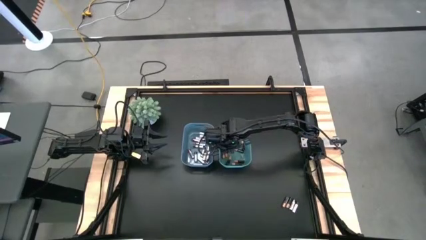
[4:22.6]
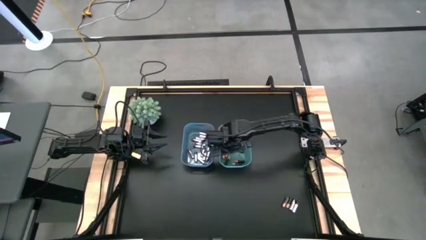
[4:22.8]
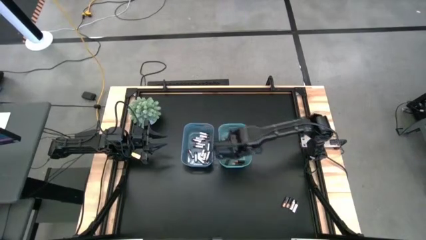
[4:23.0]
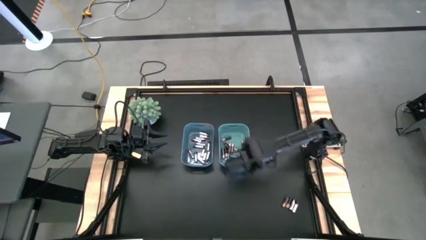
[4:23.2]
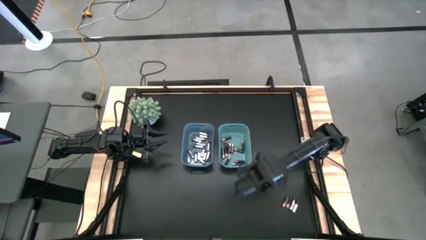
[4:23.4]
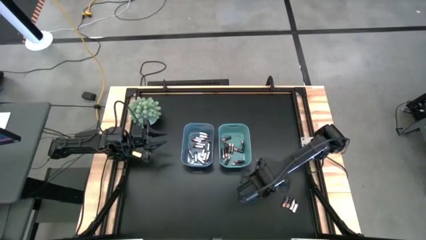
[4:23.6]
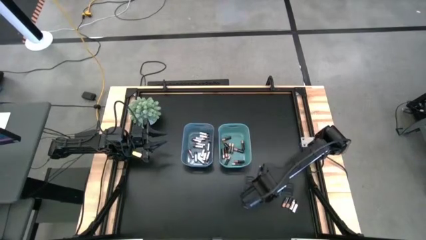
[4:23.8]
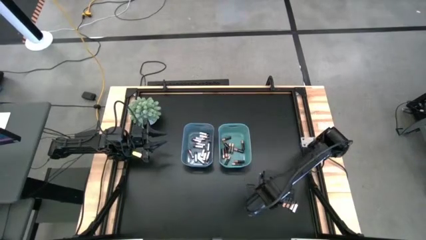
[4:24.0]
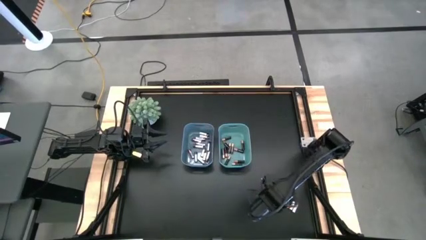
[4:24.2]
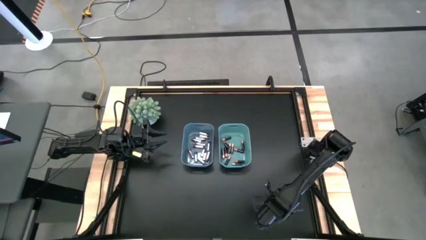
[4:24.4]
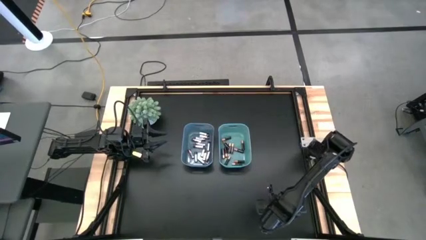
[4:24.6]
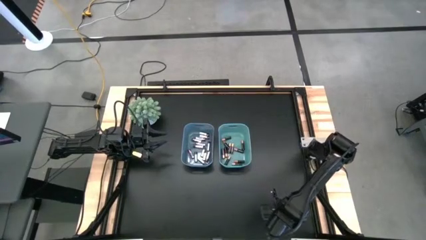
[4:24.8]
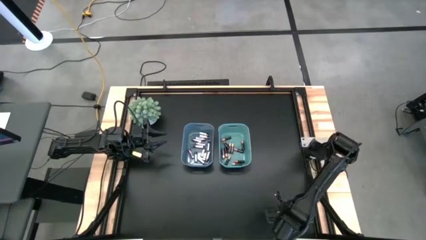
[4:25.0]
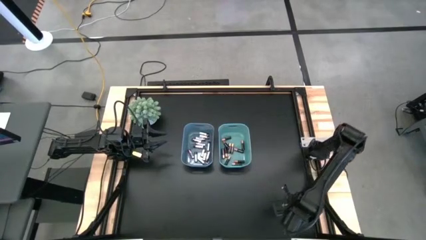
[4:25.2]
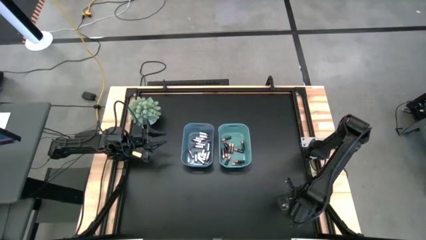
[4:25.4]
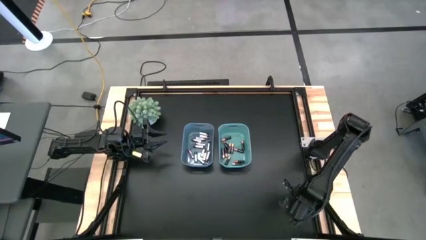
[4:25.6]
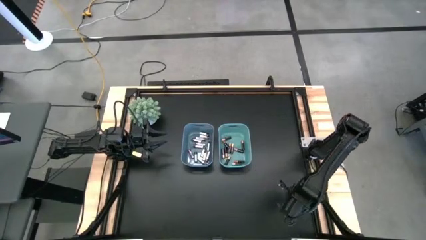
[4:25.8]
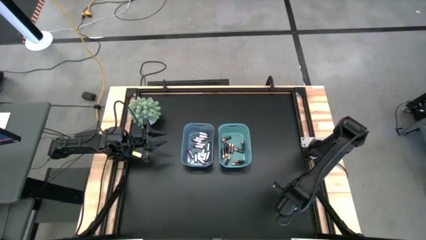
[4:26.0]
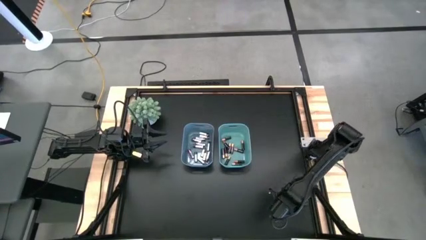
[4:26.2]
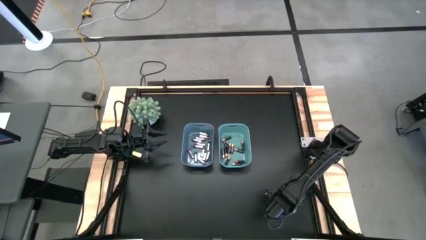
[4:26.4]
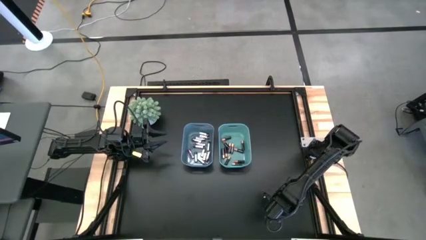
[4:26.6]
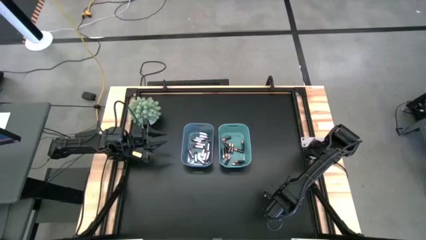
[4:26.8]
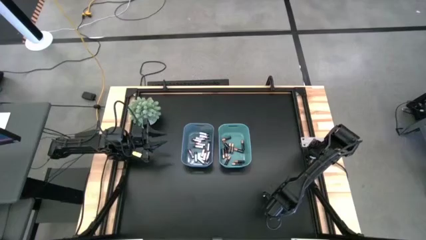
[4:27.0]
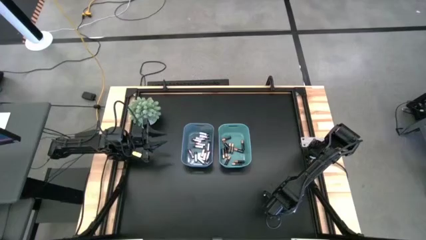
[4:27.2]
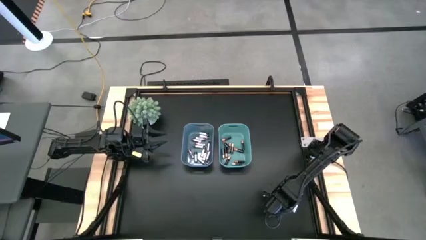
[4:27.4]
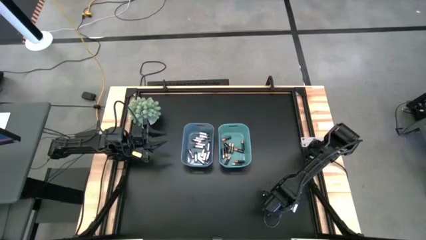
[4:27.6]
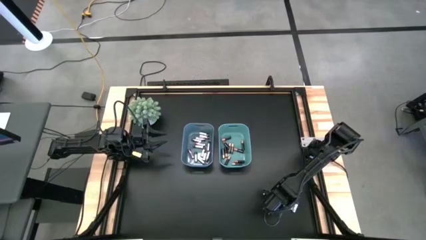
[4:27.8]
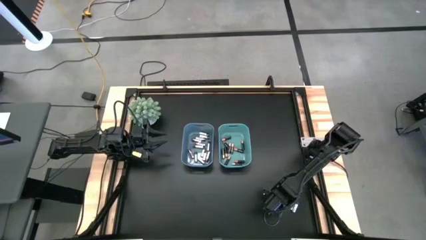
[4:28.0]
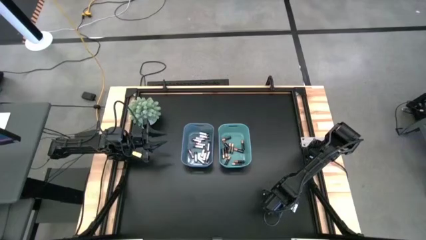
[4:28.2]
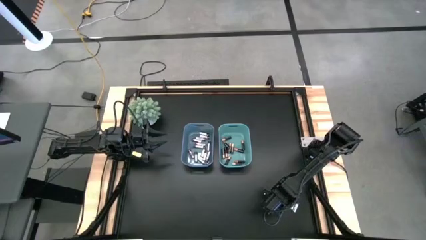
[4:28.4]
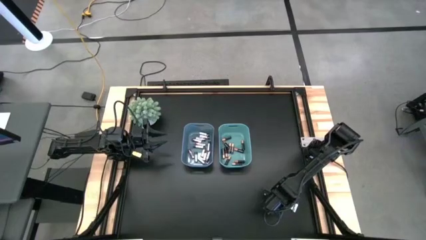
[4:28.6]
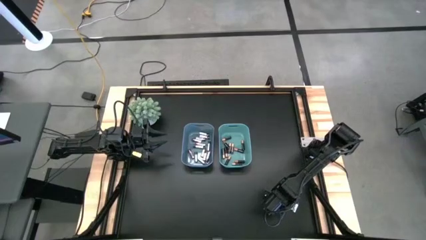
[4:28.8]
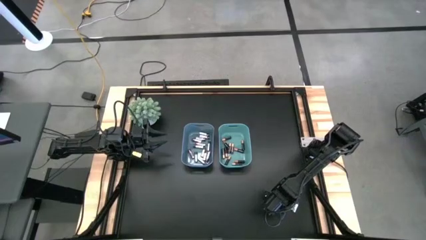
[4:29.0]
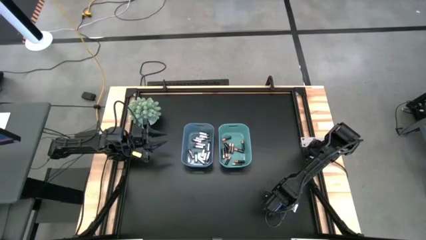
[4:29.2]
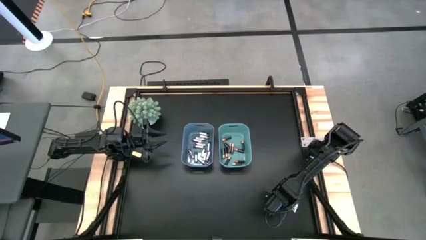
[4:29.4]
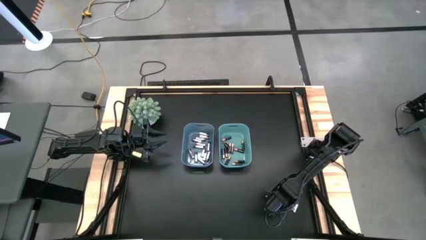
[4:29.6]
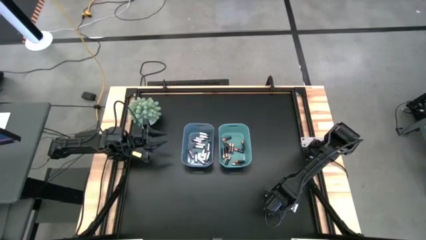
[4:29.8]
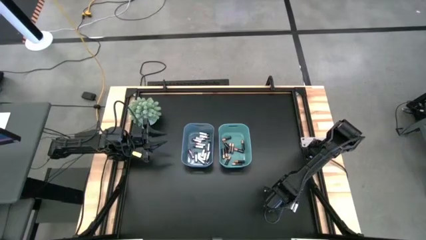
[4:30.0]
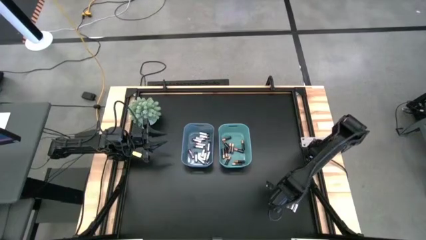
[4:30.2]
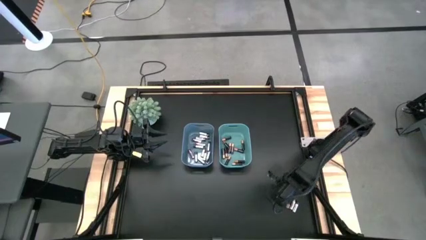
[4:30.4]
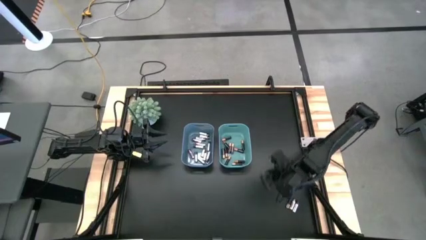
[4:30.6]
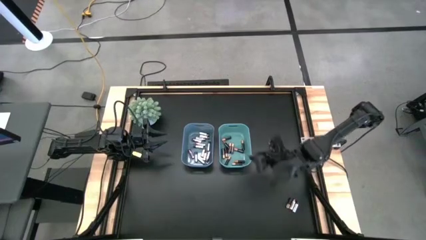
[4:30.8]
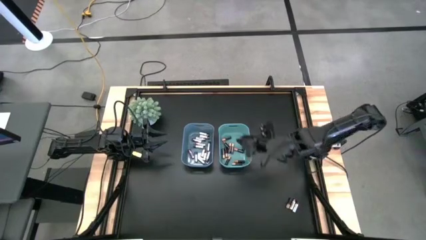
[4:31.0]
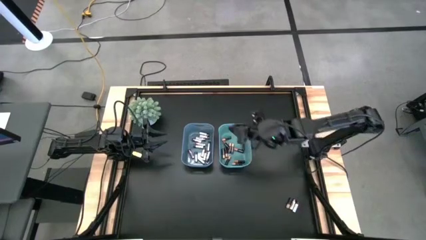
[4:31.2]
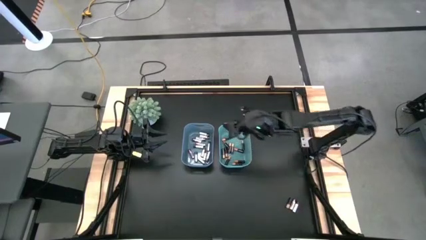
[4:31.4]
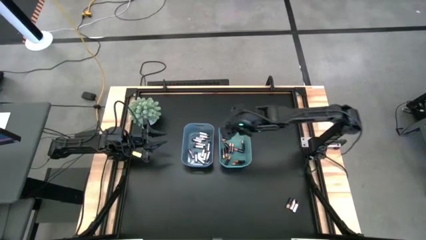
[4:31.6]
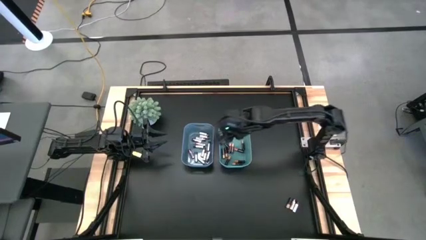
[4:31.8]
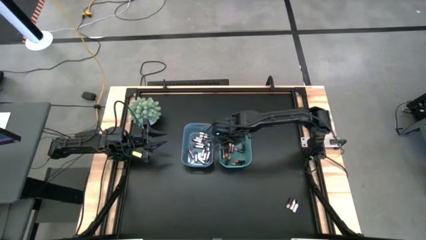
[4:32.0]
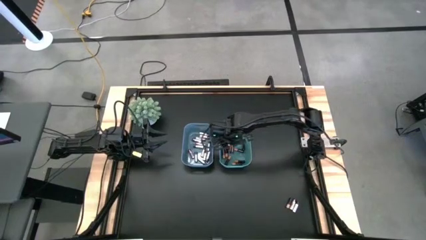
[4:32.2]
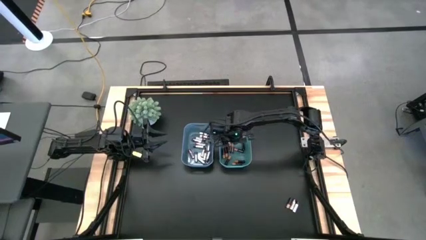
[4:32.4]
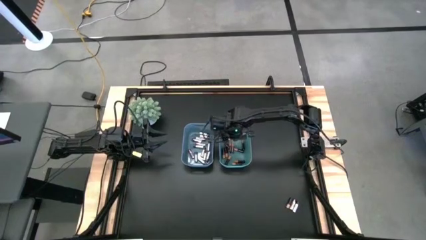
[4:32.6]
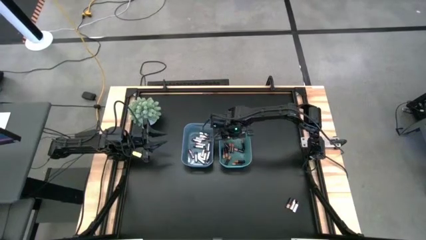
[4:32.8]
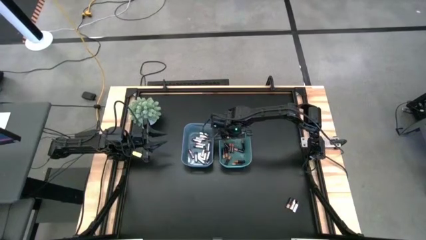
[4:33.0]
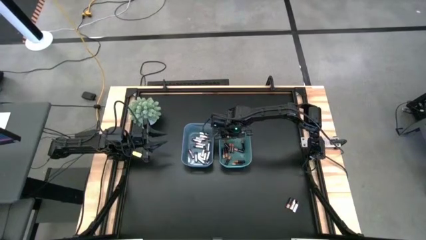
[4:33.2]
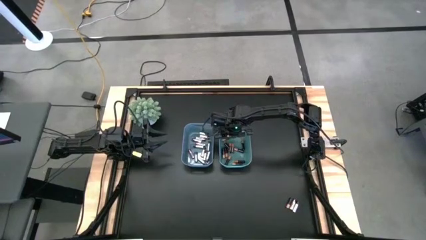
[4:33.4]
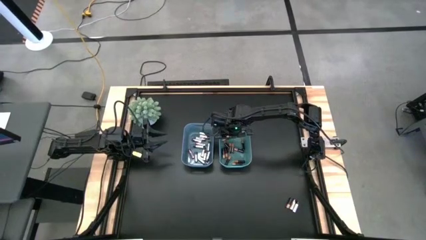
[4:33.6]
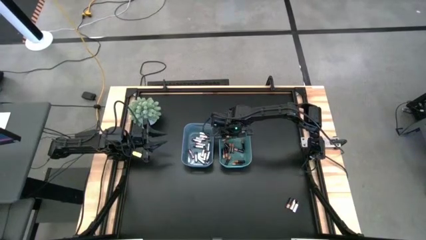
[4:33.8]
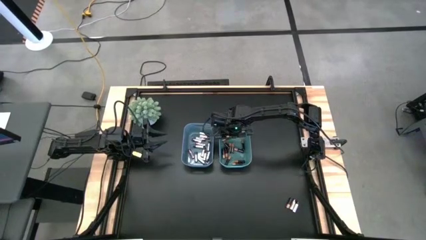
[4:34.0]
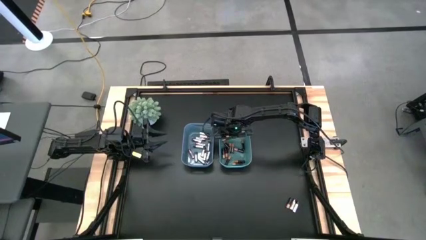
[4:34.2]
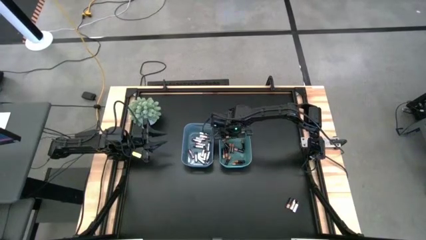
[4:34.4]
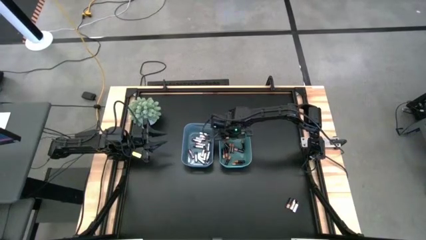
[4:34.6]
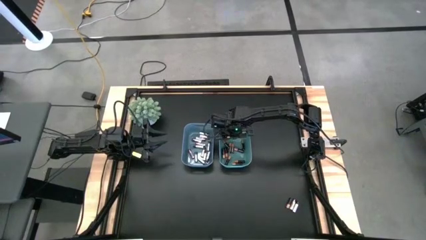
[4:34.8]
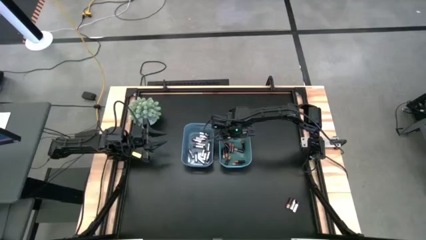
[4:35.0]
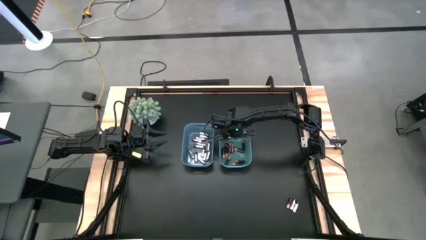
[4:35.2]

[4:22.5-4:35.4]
Task: Sort batteries
Put the black battery into the green bin

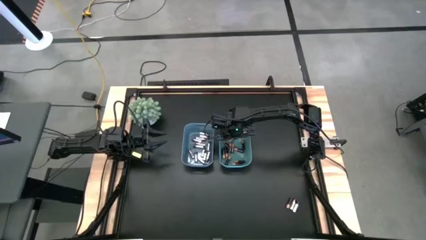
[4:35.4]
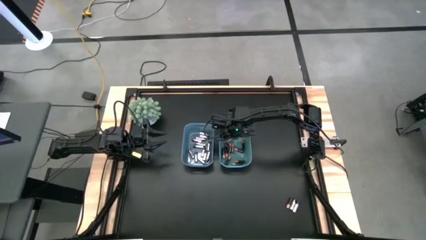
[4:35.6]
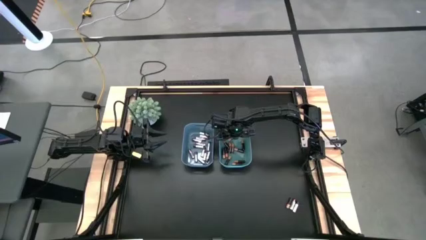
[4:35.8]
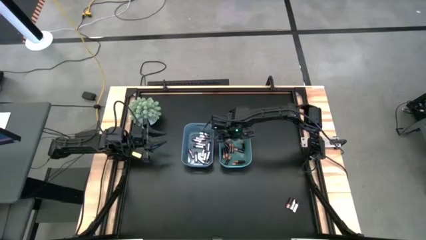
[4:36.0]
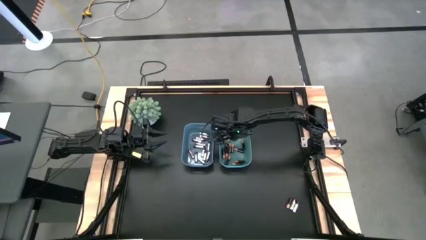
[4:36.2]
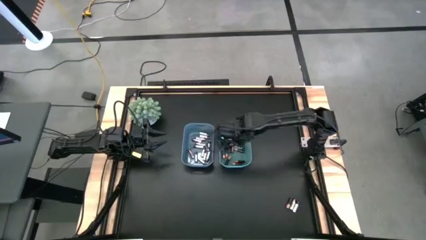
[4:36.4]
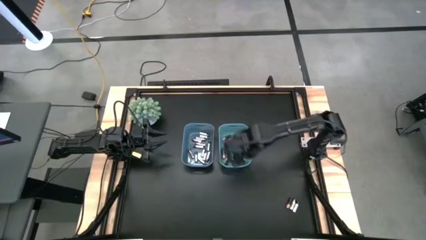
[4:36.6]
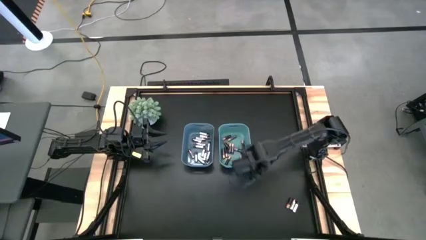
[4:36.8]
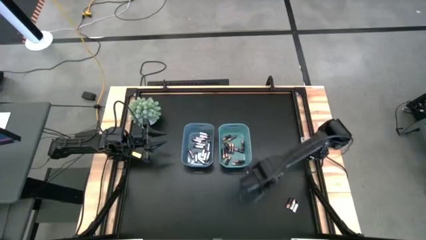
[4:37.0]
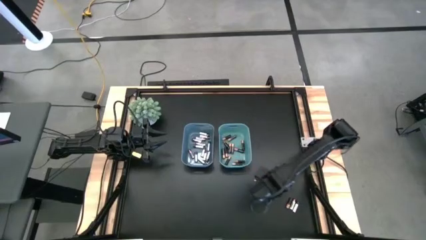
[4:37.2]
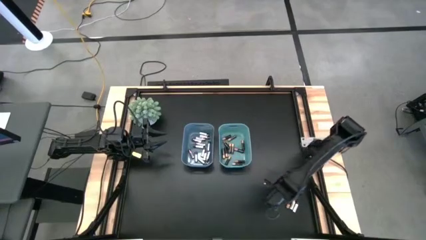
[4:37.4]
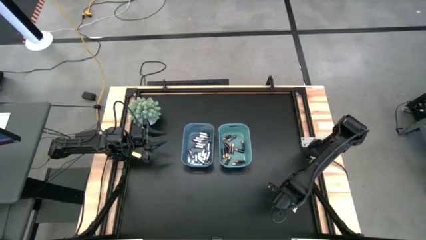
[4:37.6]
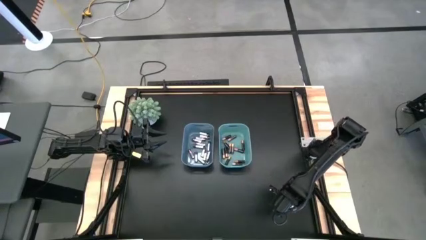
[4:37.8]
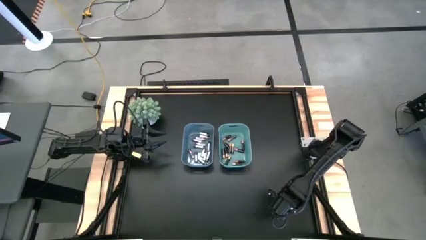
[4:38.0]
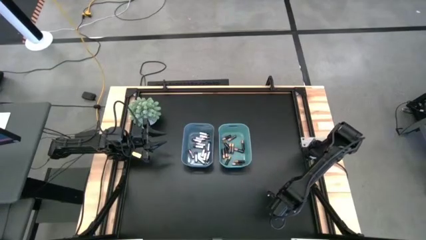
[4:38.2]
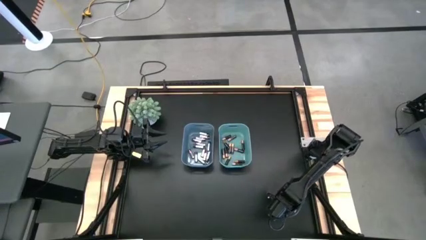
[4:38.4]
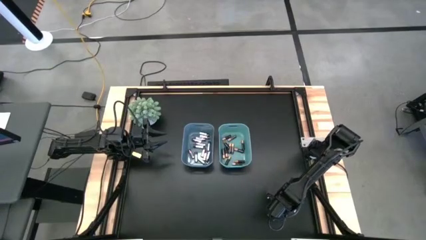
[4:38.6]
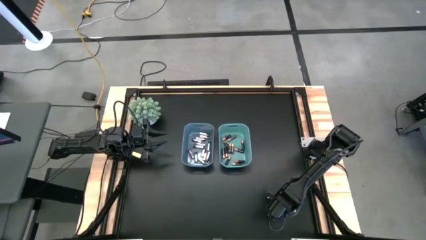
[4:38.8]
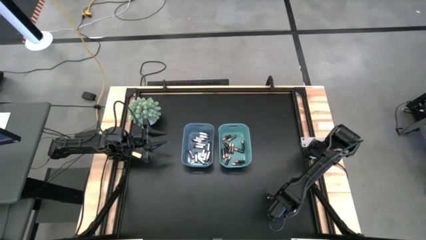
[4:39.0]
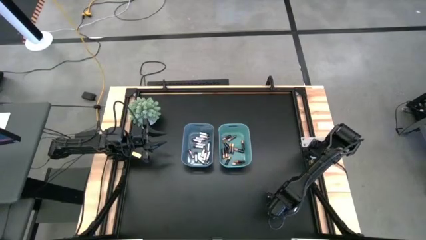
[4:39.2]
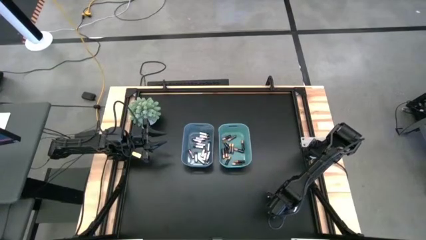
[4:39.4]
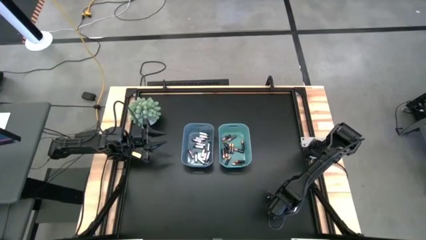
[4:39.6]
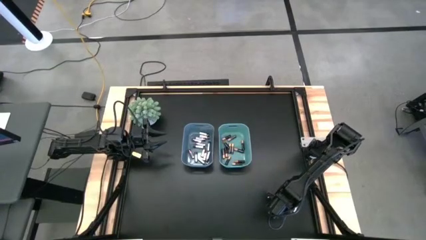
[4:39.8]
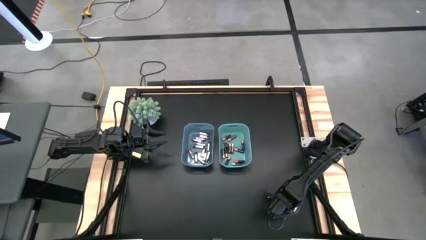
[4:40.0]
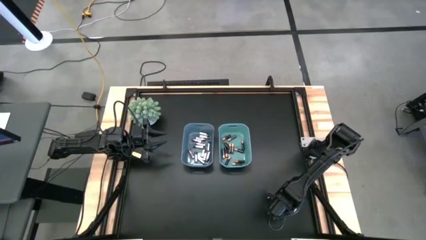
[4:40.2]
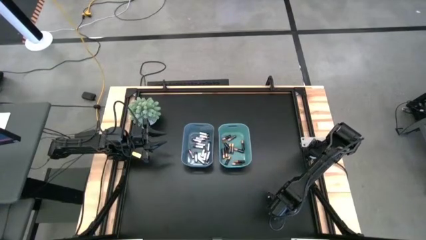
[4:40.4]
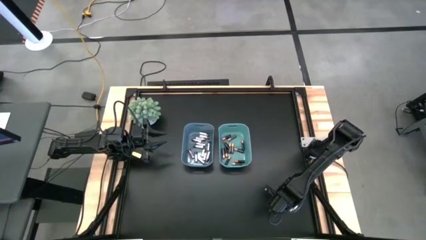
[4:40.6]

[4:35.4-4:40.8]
Put the black battery into the green bin
